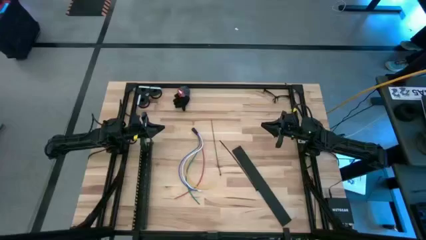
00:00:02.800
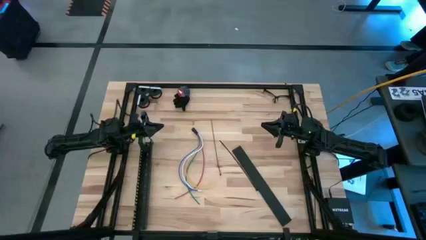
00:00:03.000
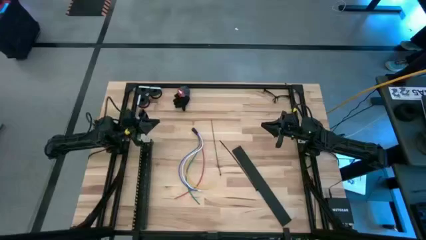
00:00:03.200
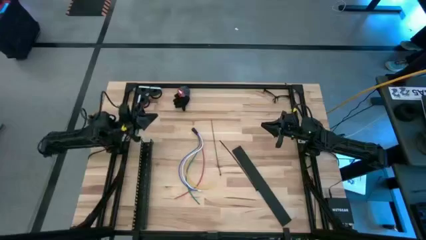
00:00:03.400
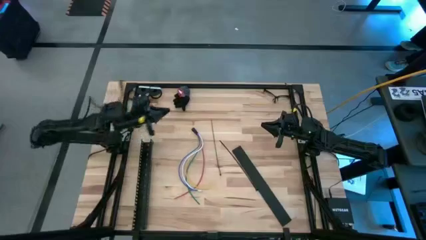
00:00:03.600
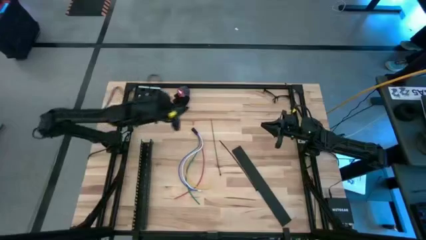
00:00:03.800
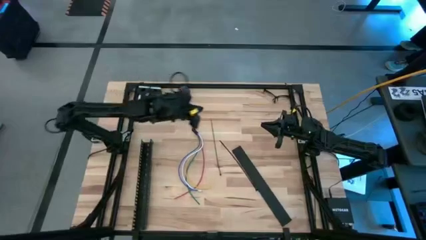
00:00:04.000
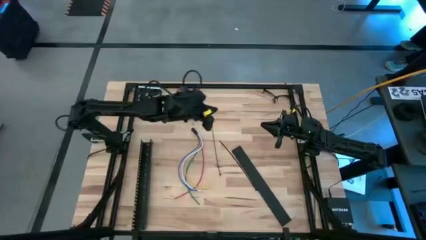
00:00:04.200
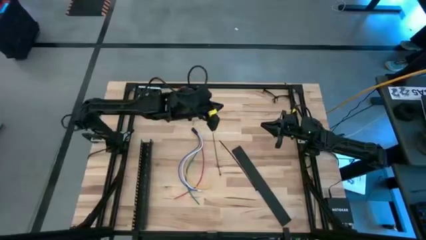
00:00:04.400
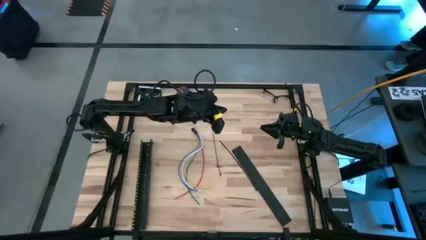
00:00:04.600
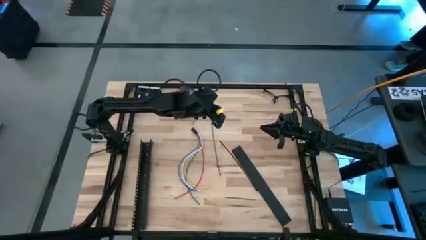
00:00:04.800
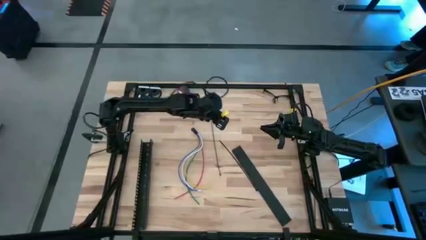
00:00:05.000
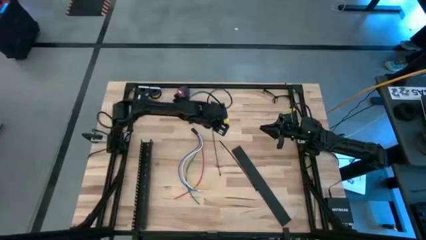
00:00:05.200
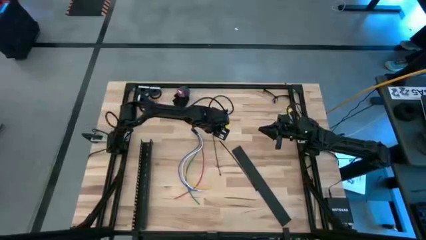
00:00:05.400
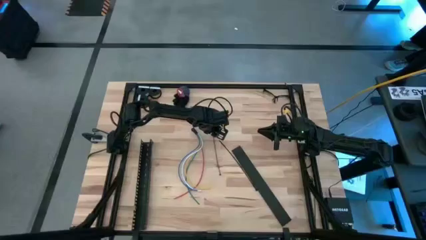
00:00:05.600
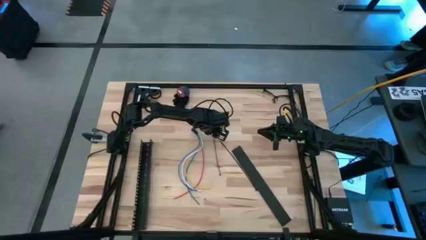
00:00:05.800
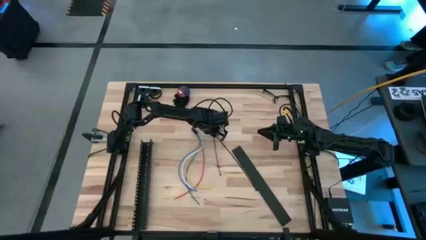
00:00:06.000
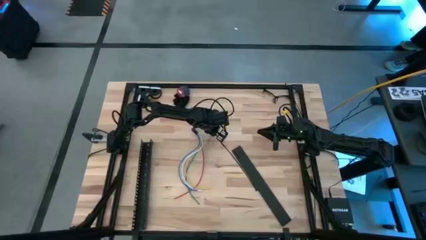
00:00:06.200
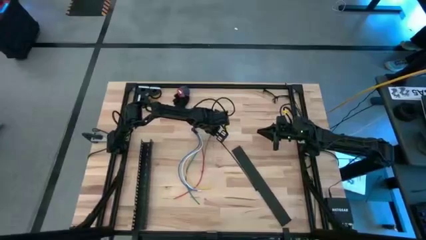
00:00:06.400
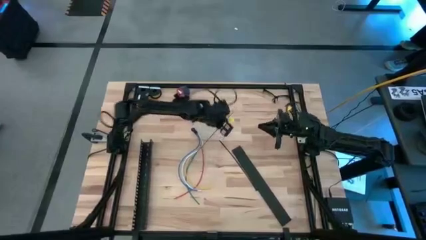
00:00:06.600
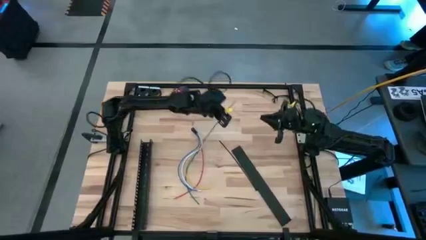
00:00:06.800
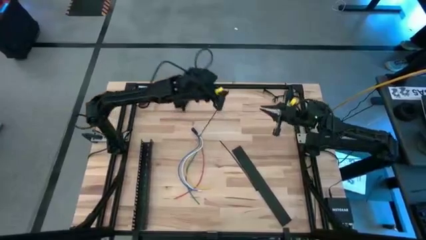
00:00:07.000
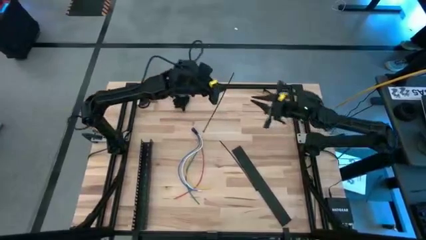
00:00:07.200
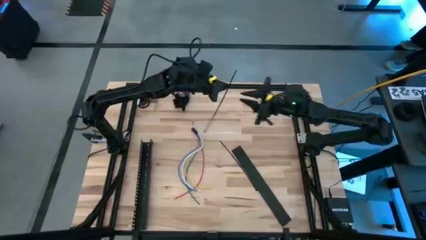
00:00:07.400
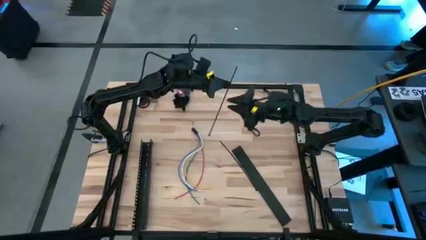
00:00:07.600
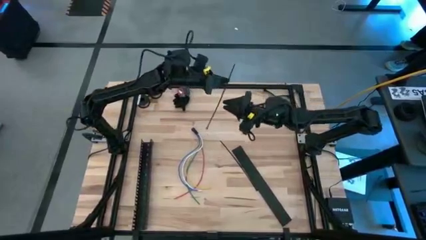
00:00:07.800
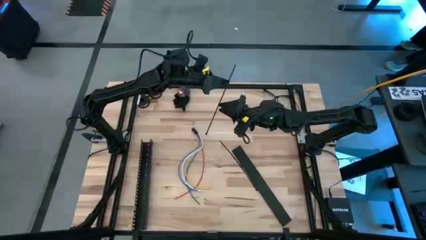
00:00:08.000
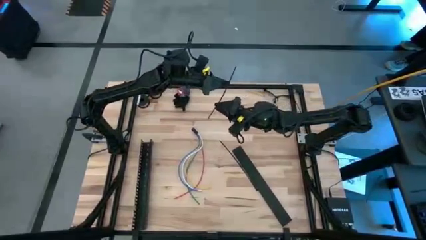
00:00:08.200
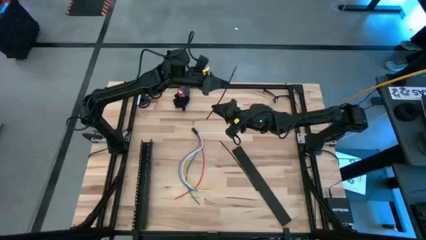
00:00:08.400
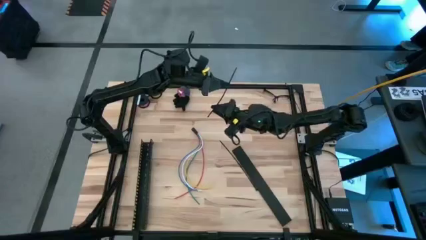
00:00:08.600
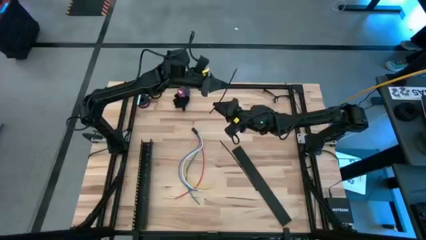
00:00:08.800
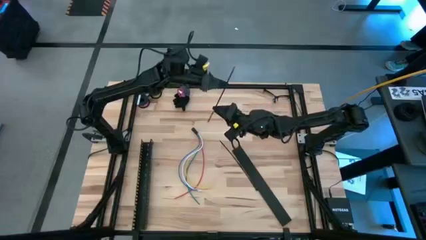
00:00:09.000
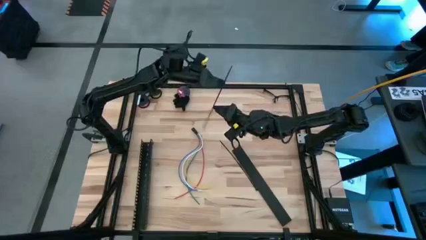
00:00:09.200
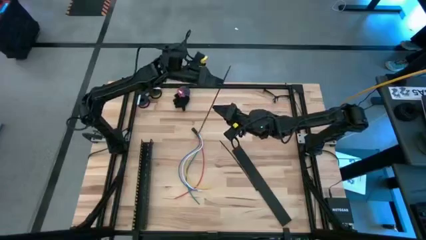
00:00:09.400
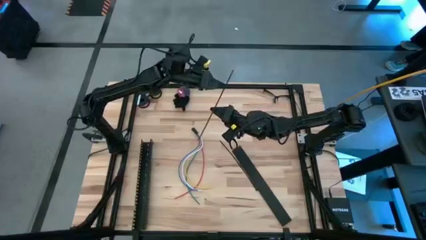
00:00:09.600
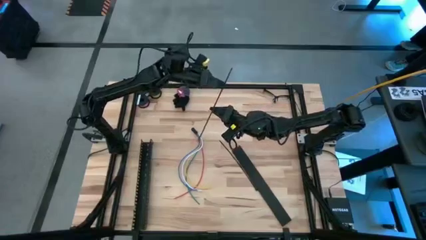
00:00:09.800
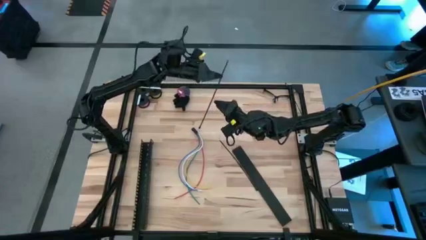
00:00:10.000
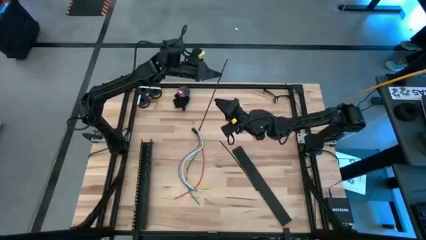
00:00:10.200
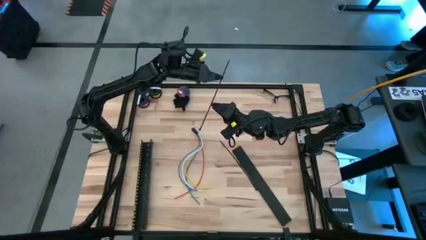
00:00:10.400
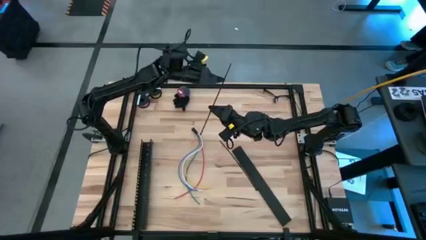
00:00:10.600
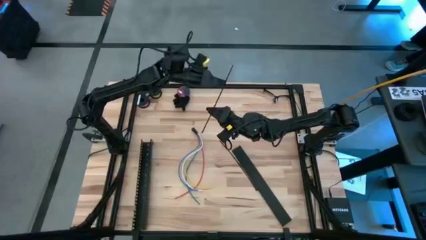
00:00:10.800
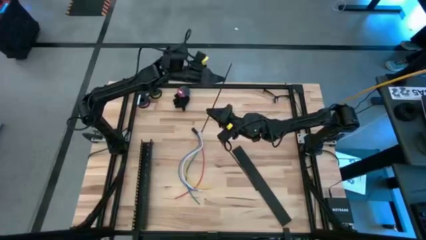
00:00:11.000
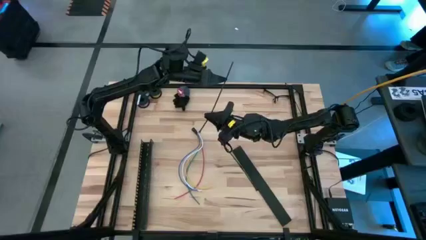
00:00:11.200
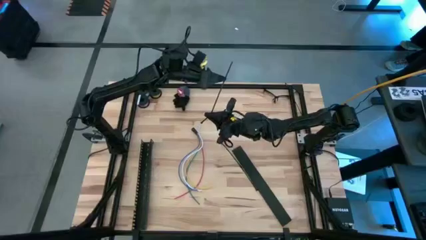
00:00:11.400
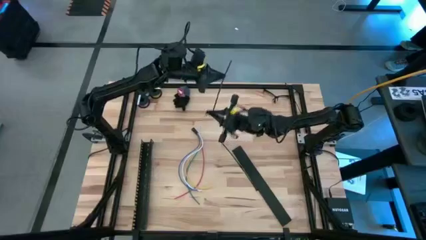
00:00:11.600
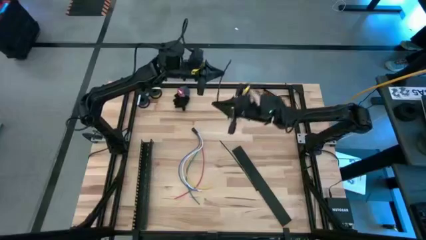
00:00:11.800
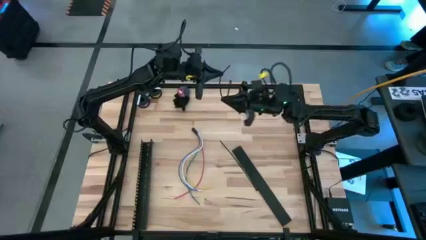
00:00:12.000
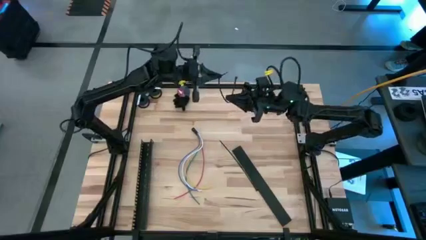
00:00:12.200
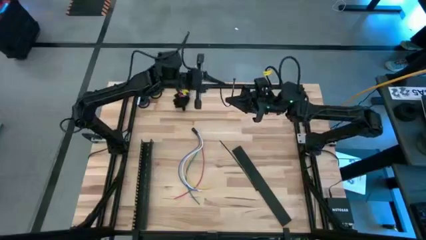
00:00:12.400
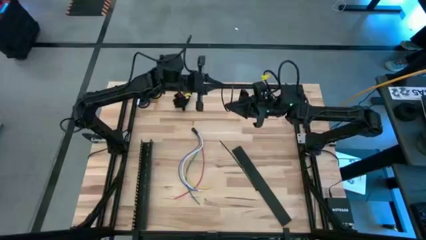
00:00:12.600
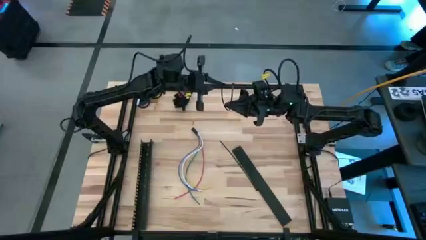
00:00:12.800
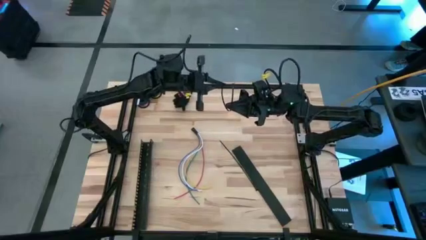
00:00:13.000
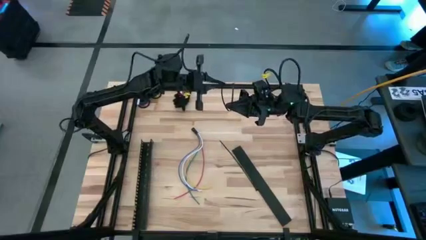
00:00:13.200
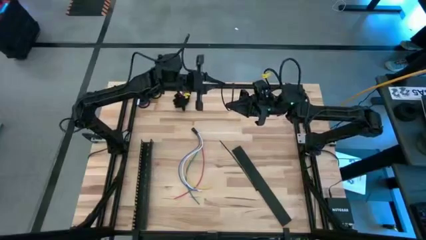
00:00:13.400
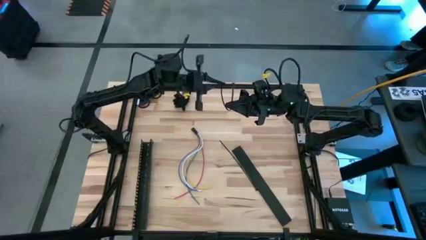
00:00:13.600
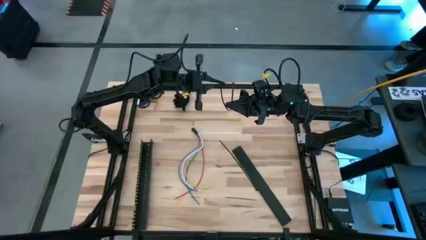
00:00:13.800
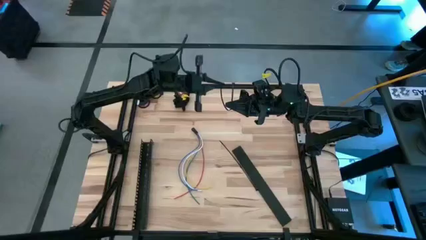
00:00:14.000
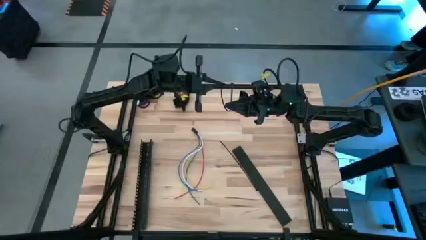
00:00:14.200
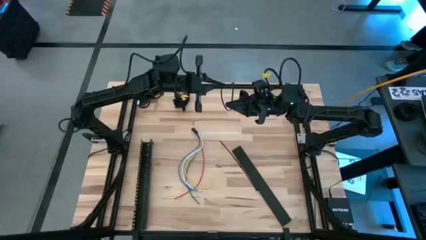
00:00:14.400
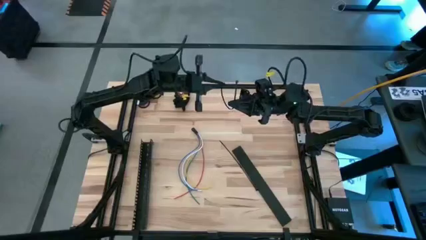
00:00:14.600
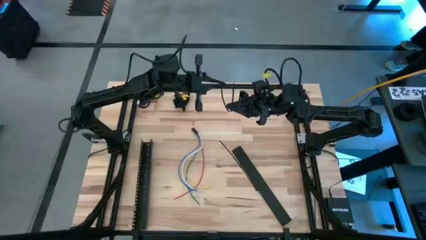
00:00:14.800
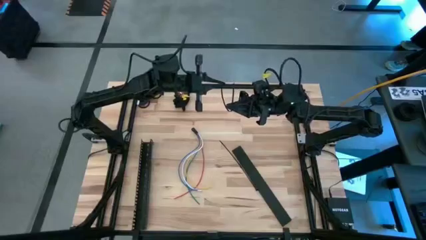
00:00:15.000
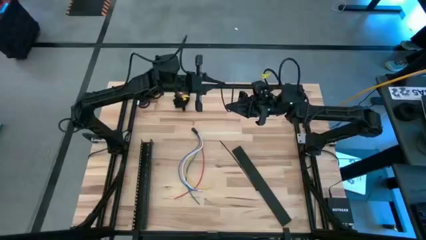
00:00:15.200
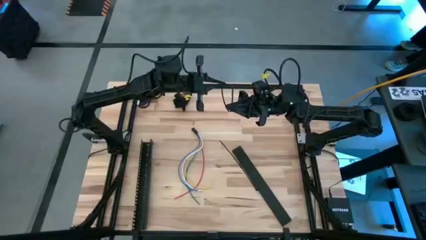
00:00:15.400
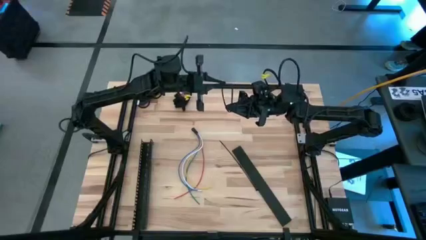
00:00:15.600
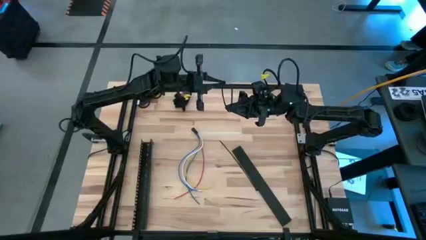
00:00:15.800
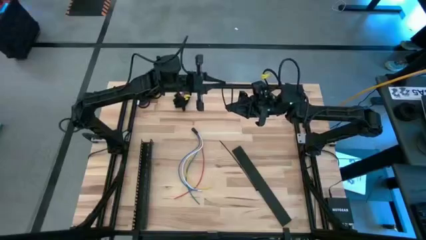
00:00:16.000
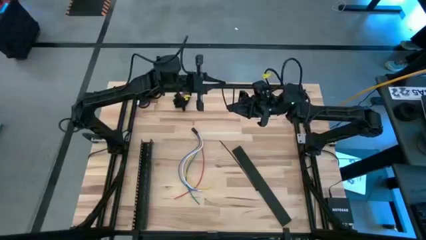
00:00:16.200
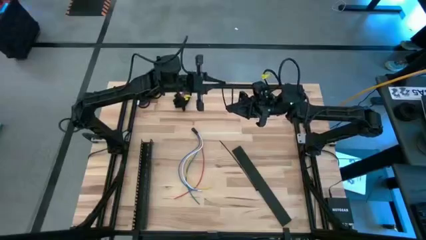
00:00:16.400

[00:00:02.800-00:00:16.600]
Task: Ziptie cables
Insert the left black zip tie tail into the locking head
